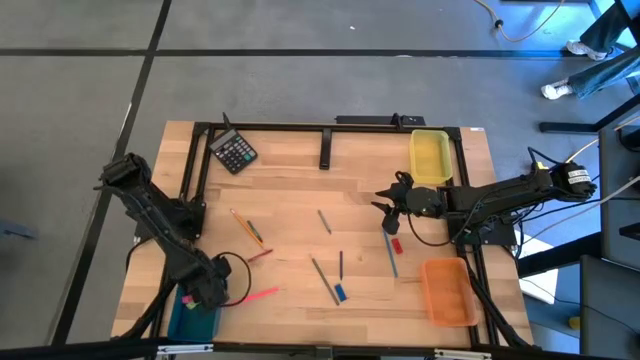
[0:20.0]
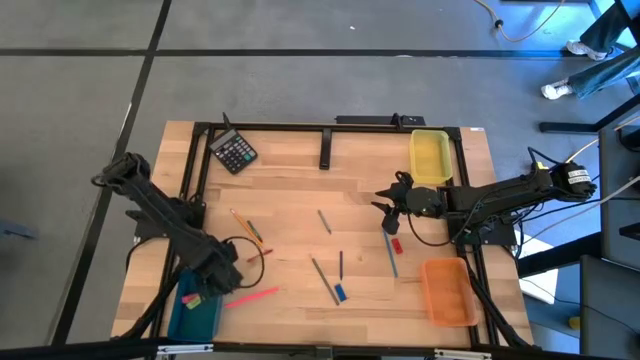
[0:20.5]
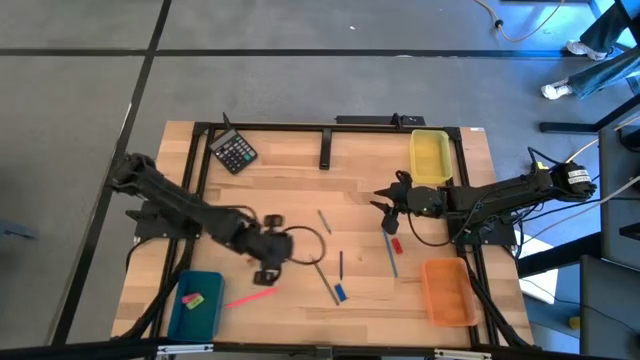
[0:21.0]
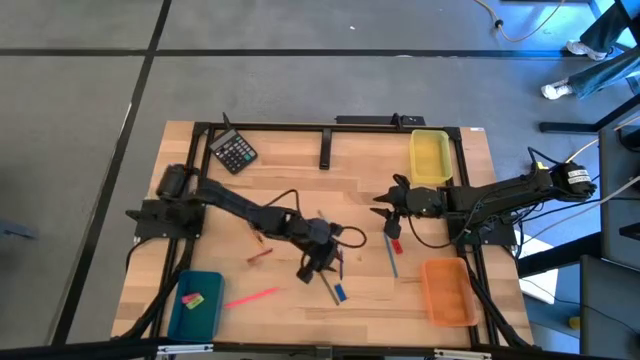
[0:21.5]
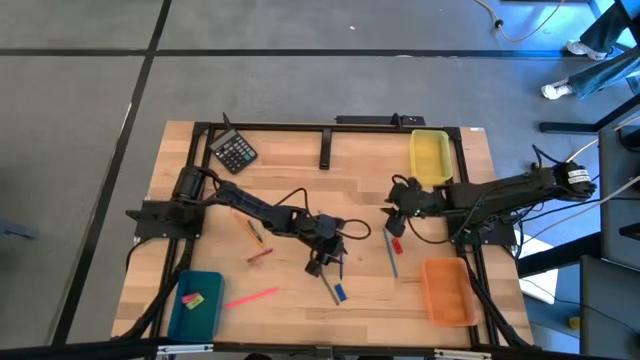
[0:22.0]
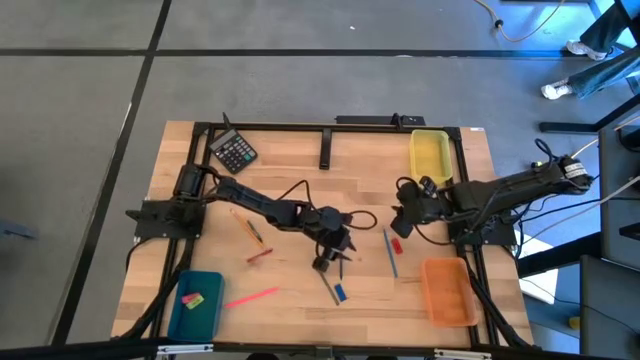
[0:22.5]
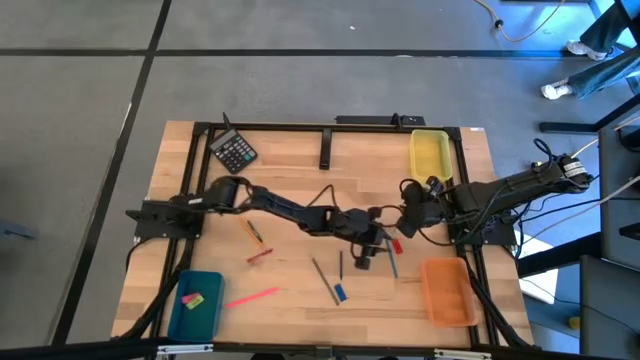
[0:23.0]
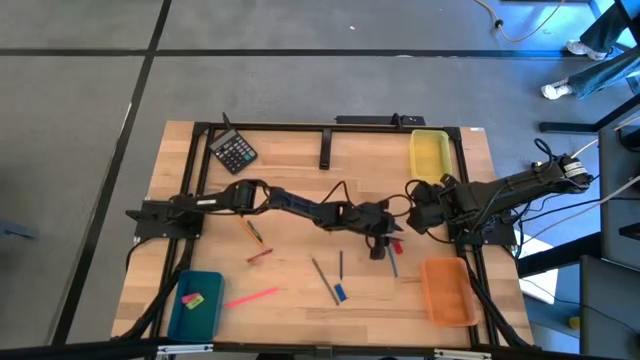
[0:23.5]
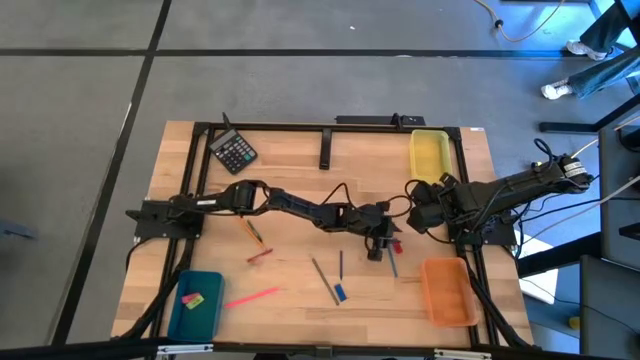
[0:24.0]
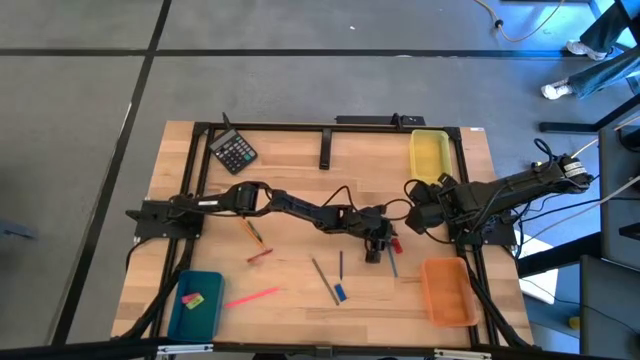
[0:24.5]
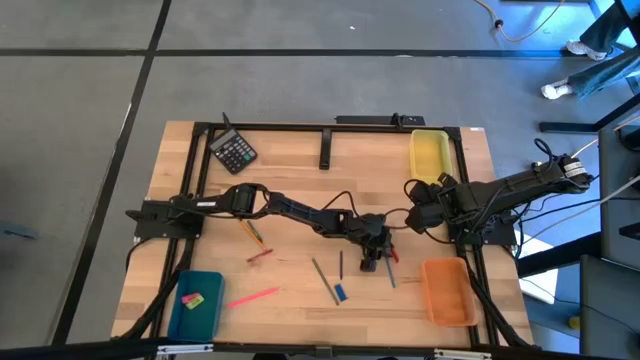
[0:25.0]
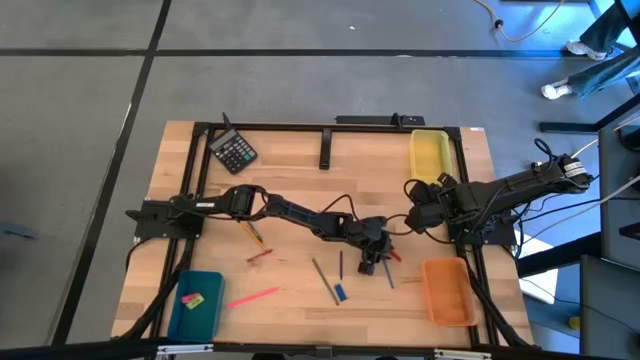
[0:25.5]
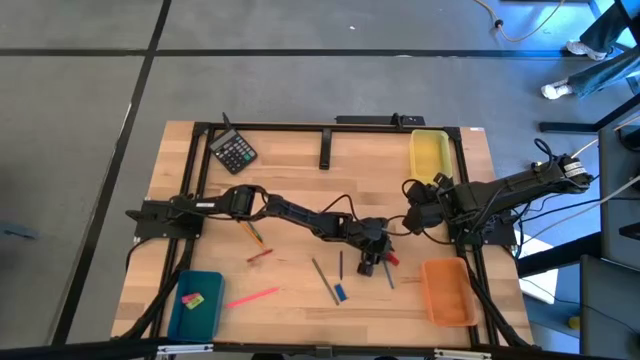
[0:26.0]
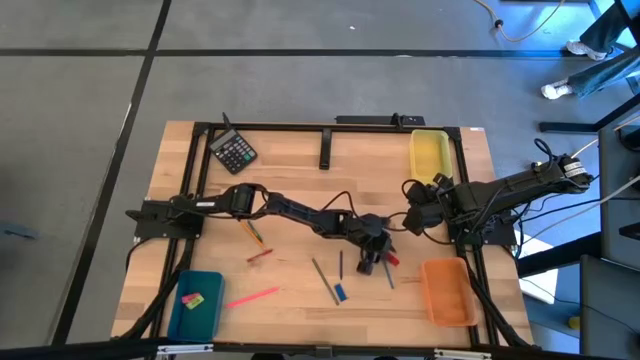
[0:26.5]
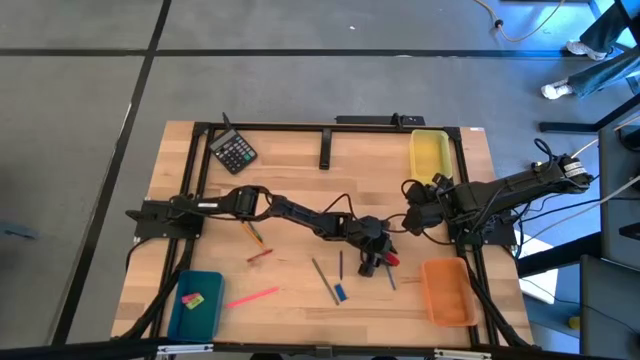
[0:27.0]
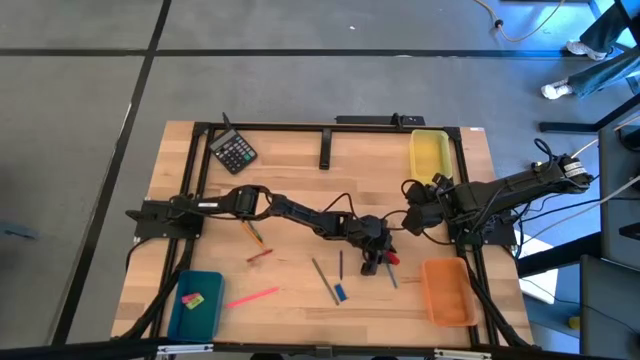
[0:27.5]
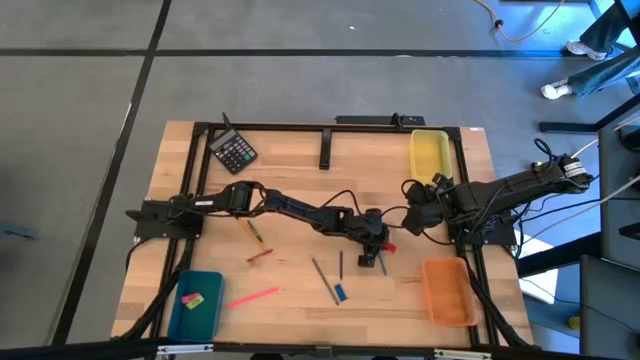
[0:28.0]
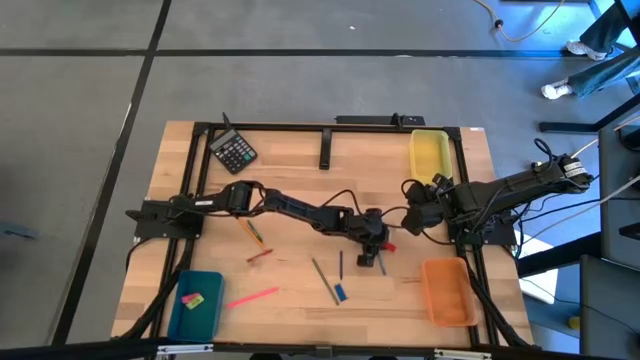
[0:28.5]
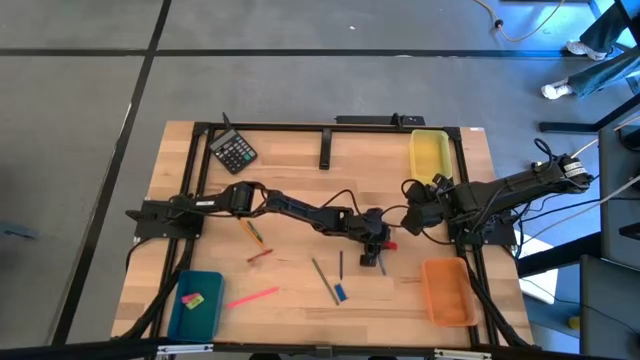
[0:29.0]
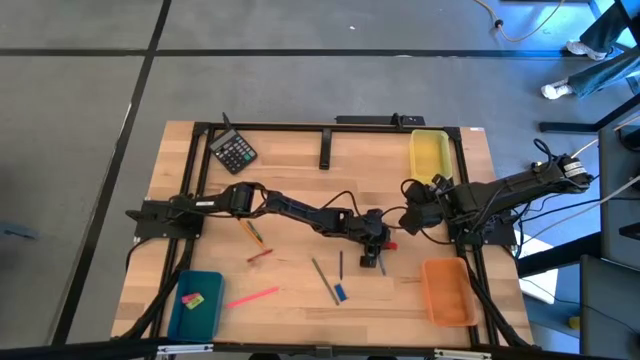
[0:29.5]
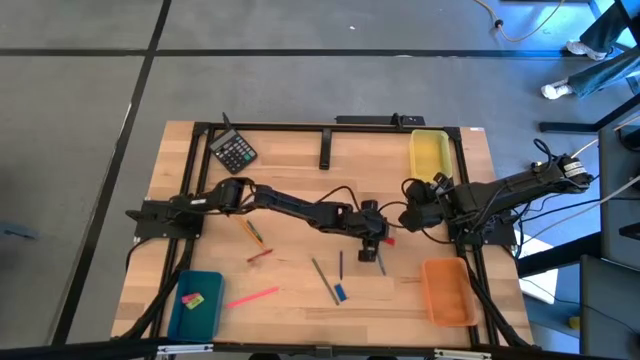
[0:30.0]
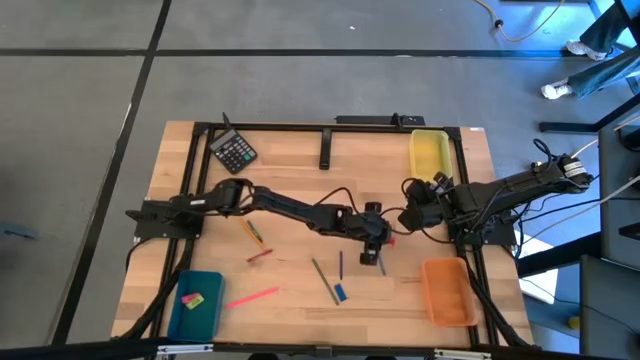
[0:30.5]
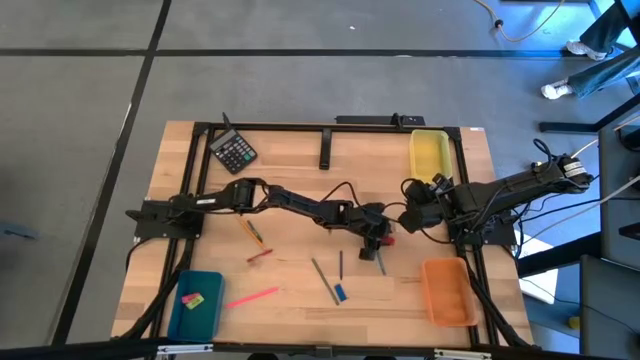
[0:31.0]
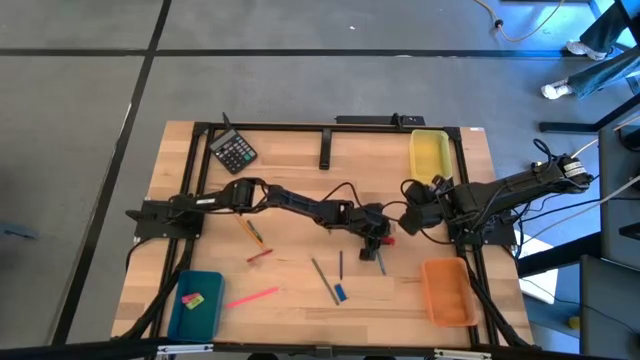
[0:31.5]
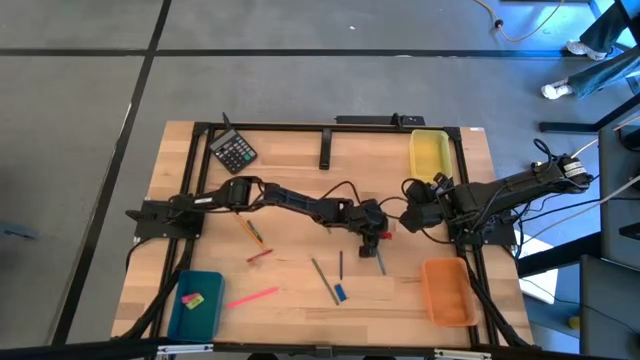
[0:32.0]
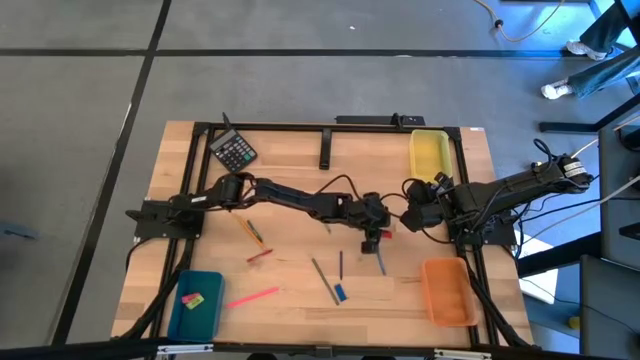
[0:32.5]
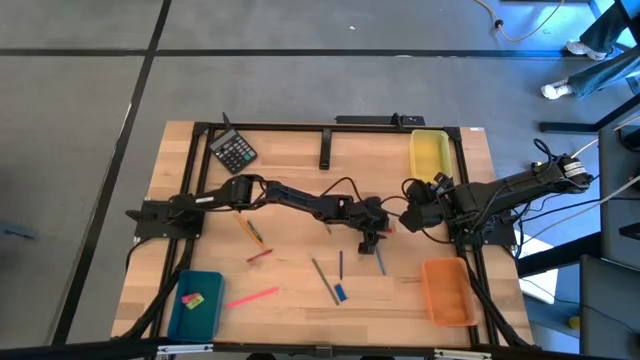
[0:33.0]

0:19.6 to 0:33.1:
Task: Sort crayons/erasers/pens/pencils in bins
Put the red eraser into the blue bin

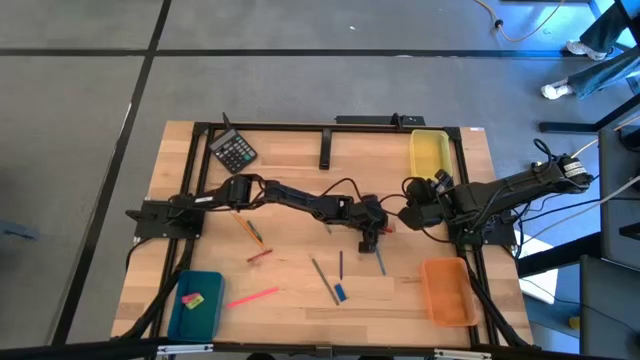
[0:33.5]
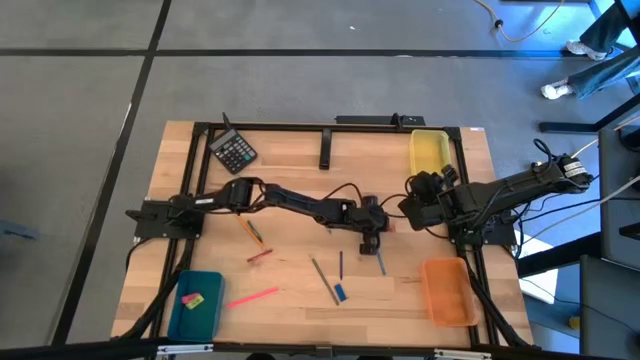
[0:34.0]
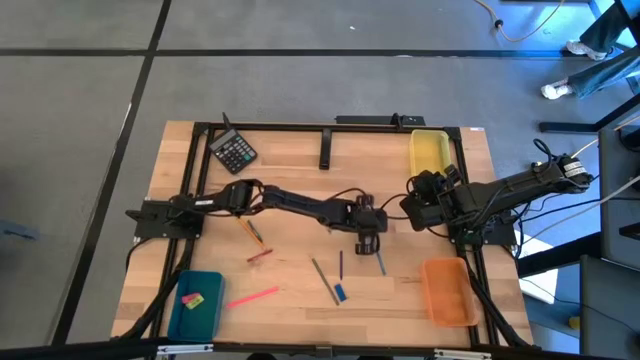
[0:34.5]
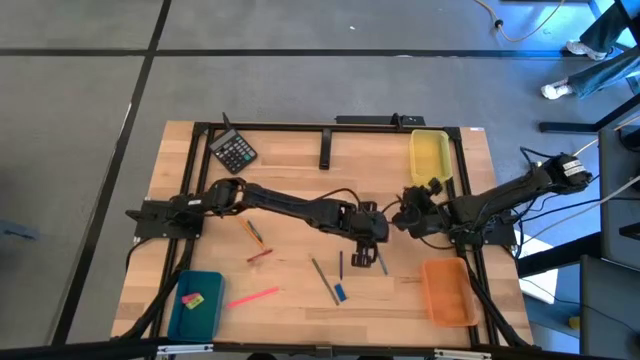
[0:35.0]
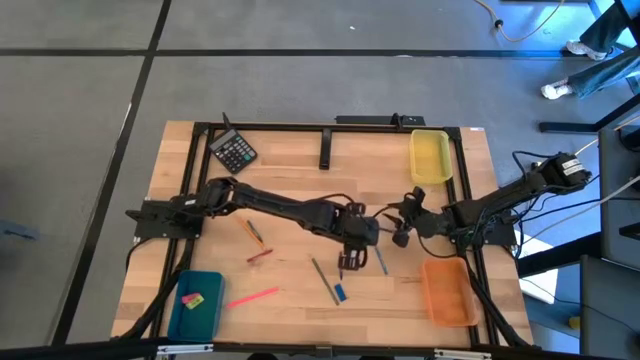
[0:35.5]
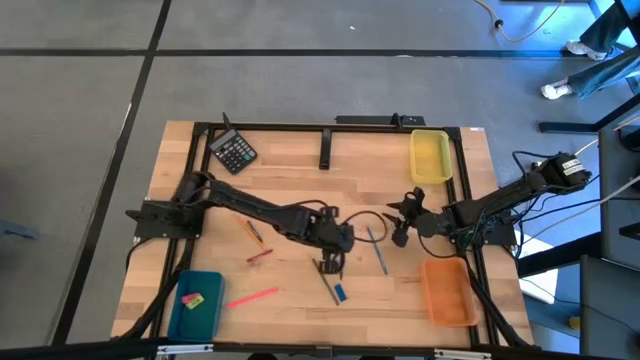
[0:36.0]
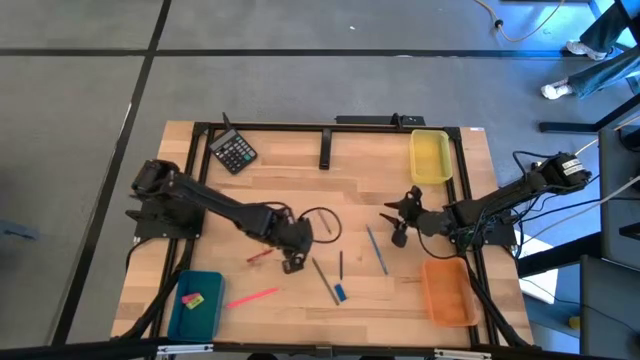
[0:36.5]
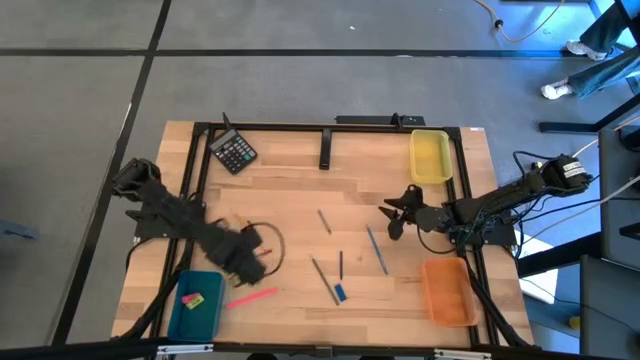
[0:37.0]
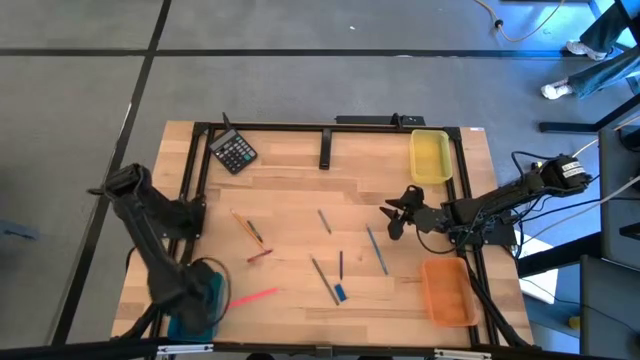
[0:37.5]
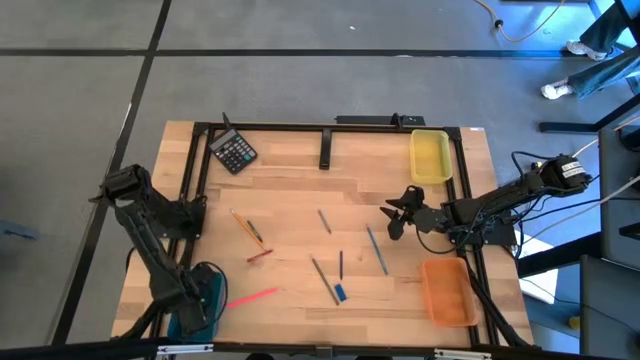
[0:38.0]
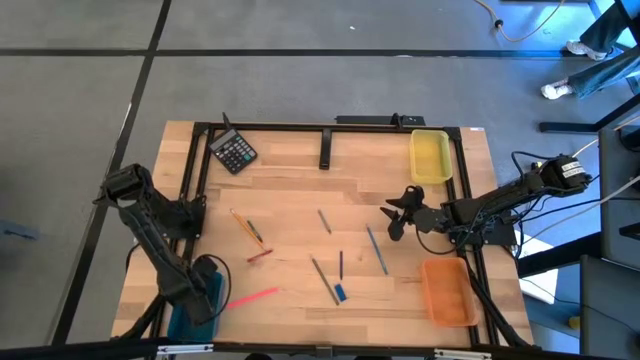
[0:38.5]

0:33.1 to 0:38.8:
Put the red eraser into the blue bin

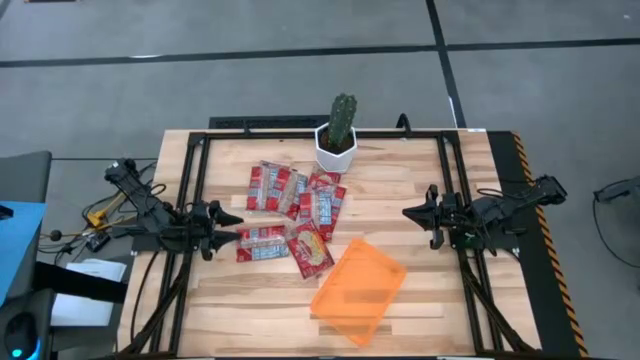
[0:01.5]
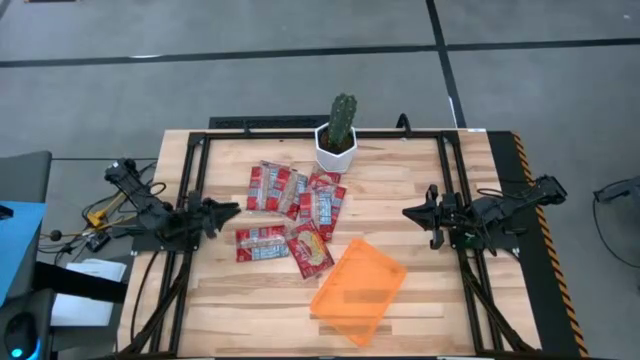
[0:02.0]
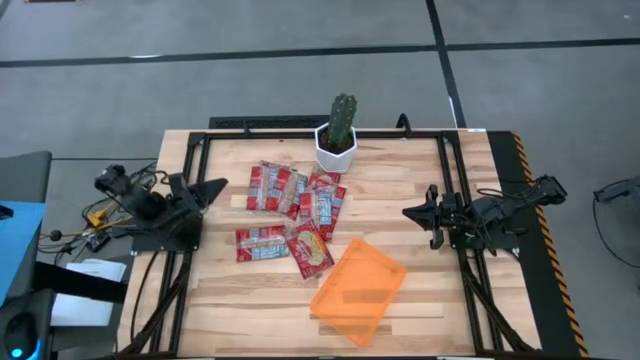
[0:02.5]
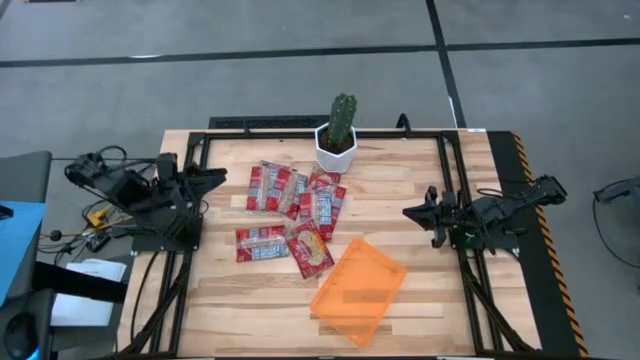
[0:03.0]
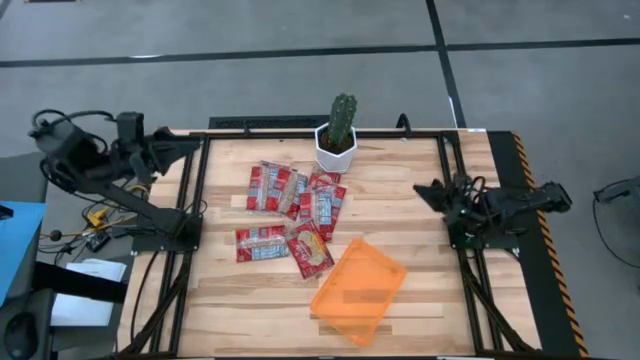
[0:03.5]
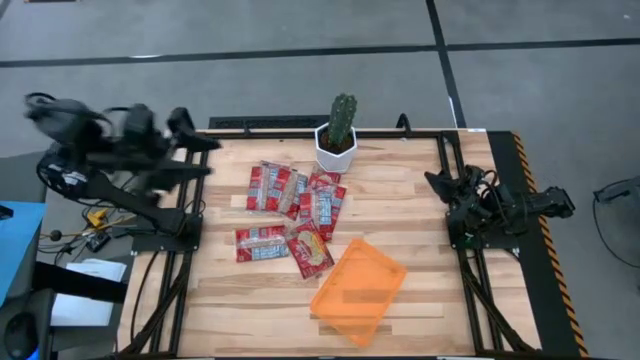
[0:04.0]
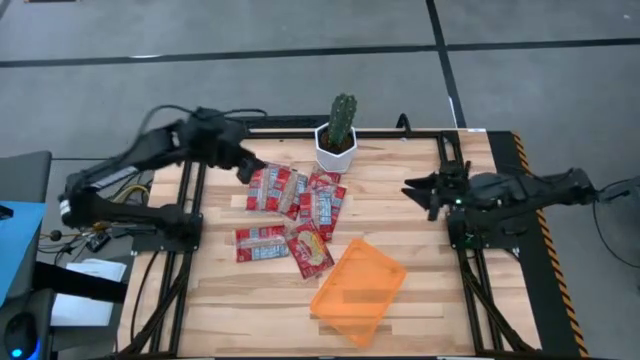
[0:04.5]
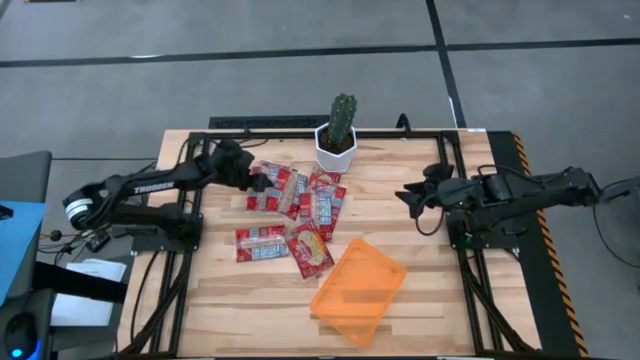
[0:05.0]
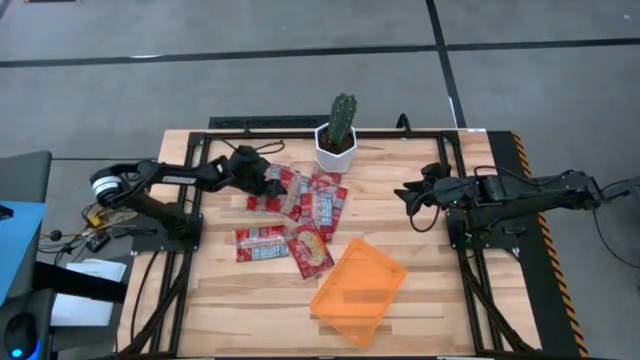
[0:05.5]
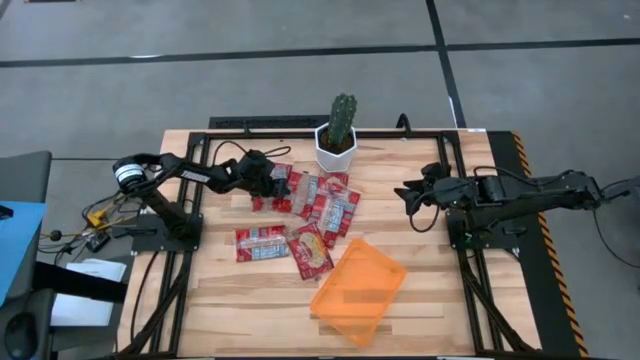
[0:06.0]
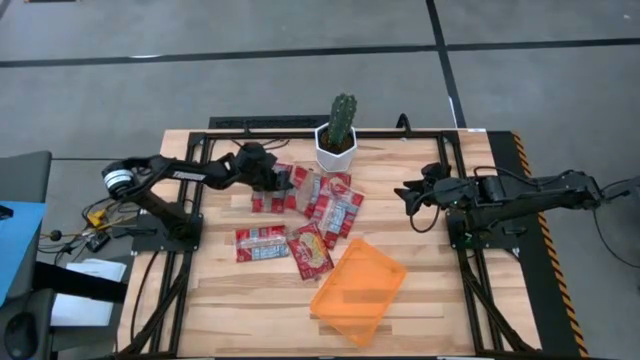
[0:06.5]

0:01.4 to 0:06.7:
Task: Sort popcorn bags into baskets
Put the red popcorn bag into the orange container
